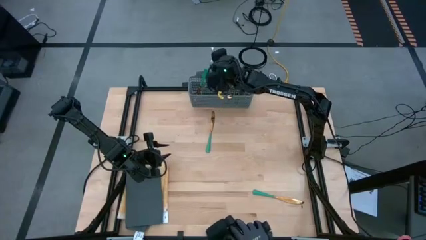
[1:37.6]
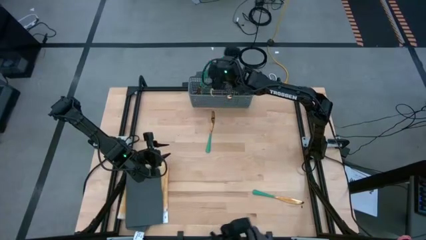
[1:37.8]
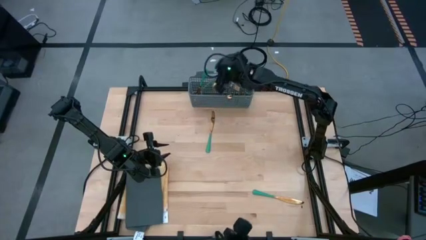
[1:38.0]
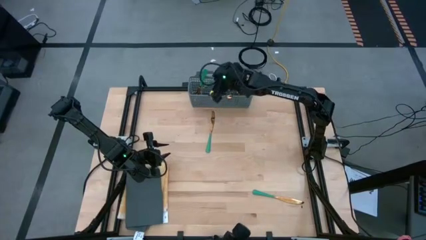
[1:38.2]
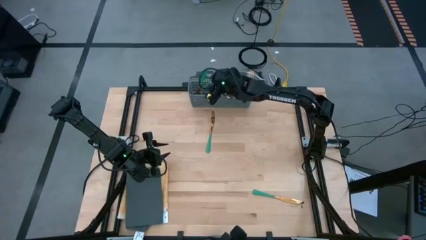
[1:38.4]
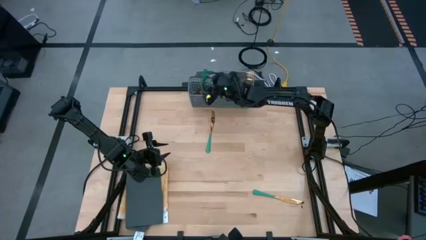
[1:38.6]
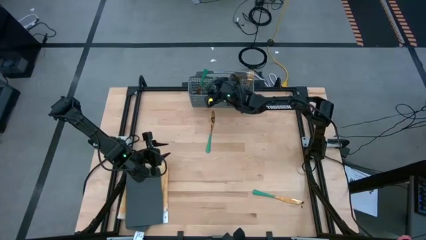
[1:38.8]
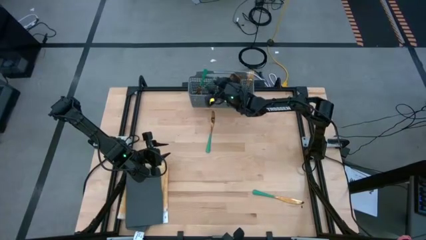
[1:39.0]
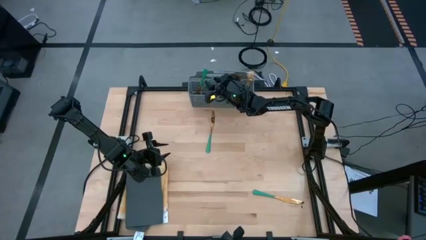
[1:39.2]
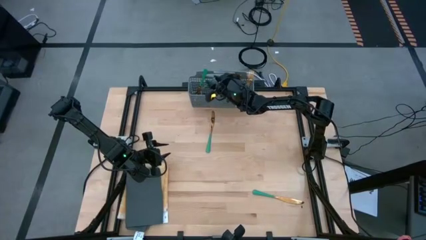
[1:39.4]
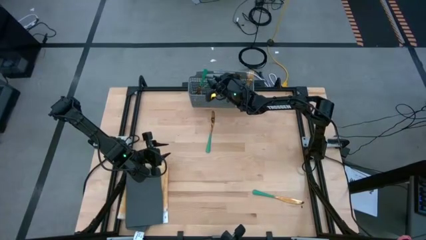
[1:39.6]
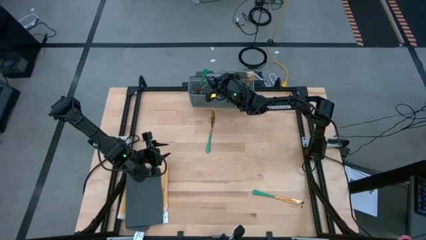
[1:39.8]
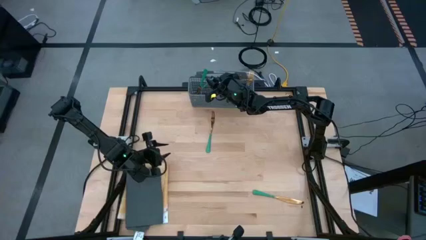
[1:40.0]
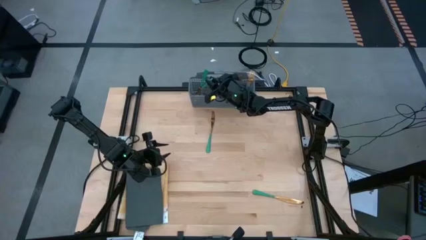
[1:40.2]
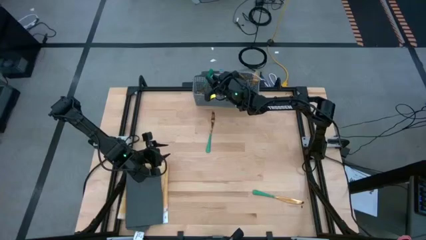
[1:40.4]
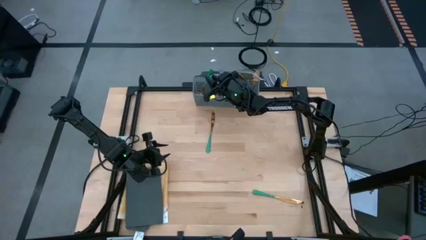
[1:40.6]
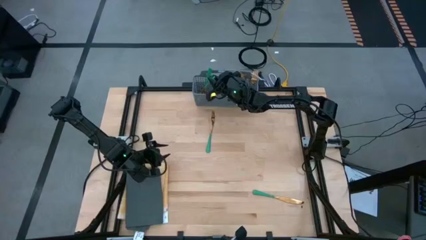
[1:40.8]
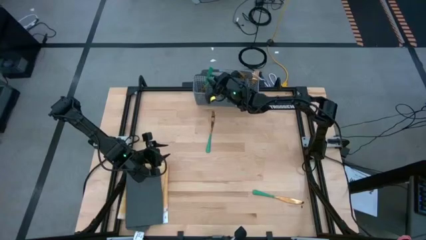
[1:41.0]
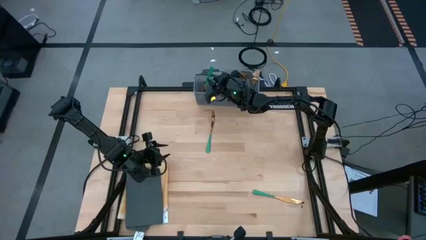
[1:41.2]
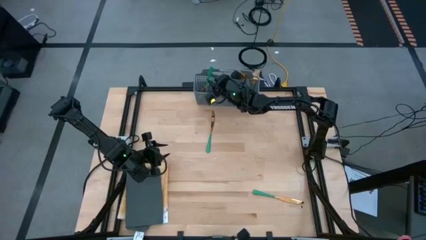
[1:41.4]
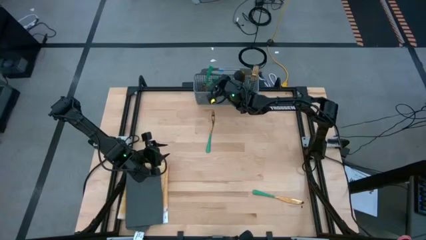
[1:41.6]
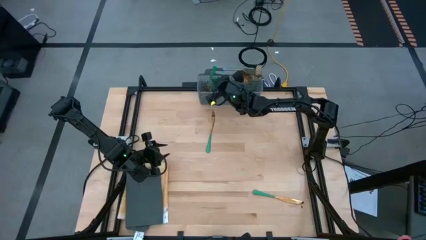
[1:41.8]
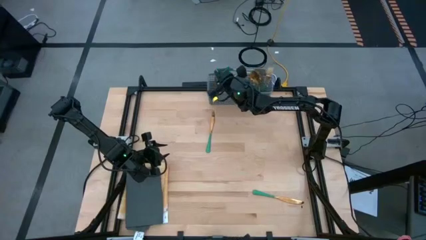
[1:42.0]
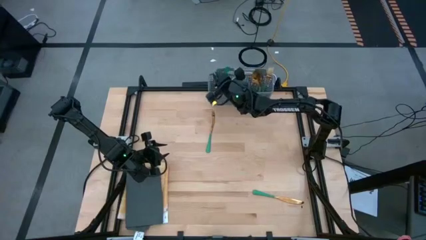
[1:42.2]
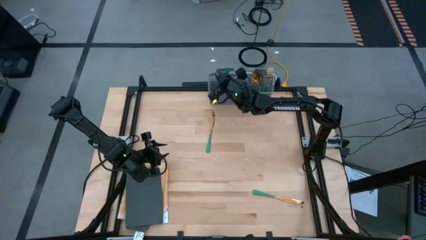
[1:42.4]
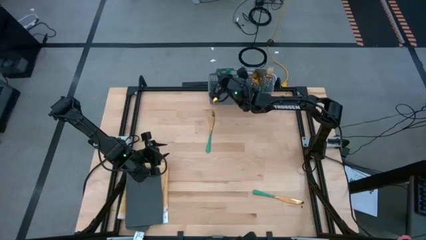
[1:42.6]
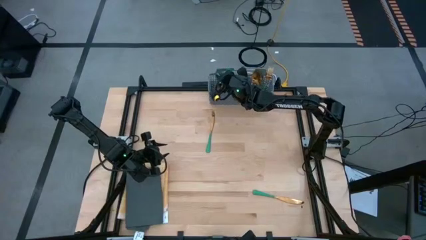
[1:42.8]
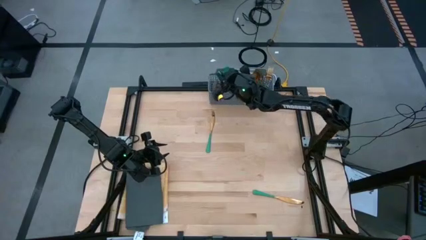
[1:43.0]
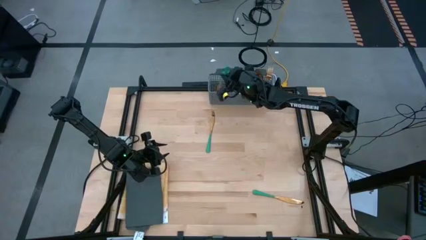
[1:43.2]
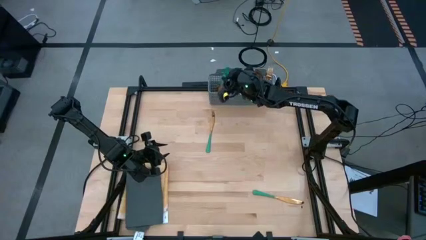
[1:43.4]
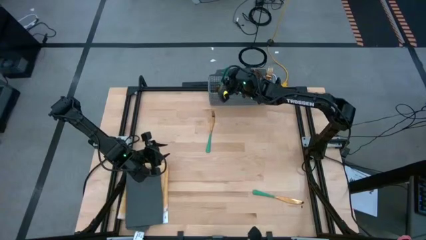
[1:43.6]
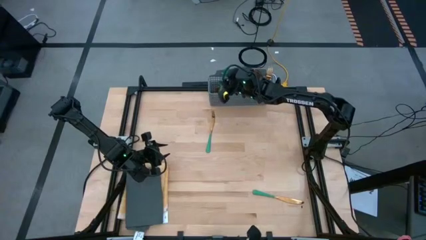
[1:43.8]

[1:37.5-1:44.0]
Task: Sort silverware
Put the green knife into the gray silverware holder

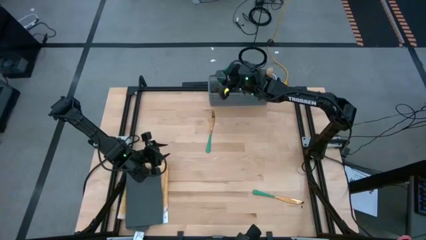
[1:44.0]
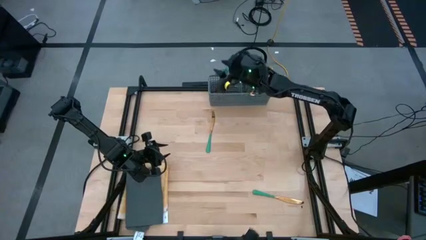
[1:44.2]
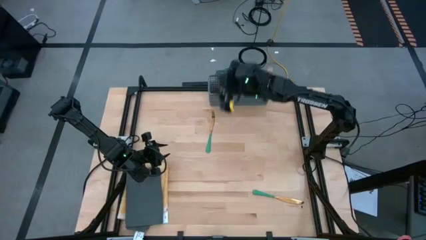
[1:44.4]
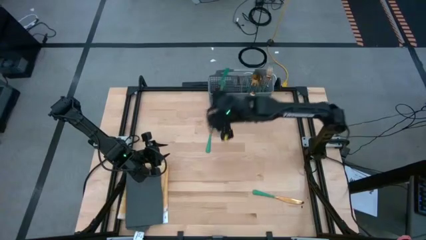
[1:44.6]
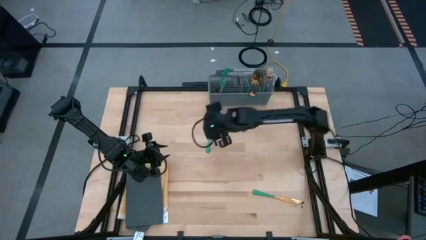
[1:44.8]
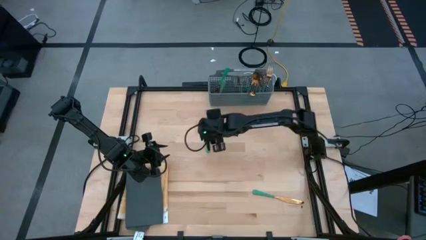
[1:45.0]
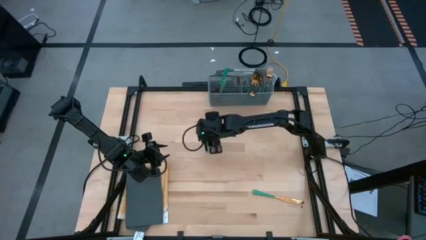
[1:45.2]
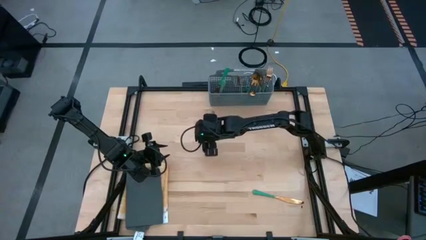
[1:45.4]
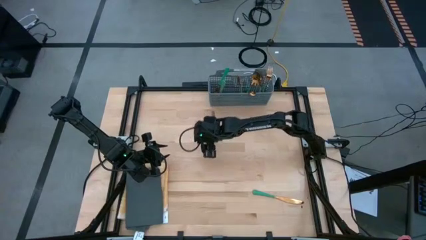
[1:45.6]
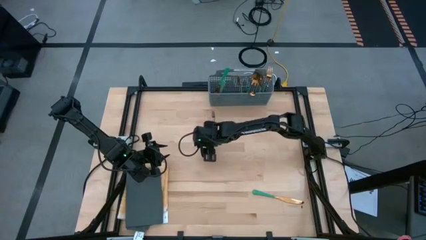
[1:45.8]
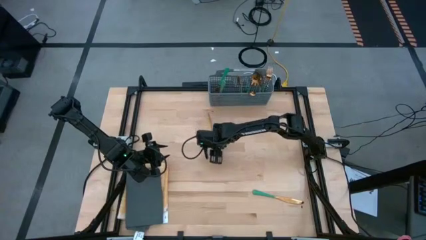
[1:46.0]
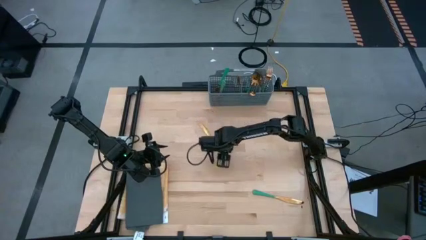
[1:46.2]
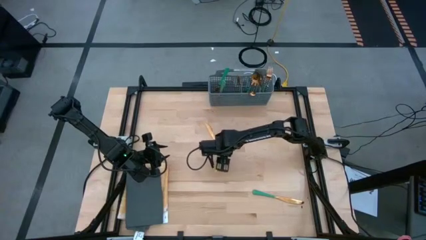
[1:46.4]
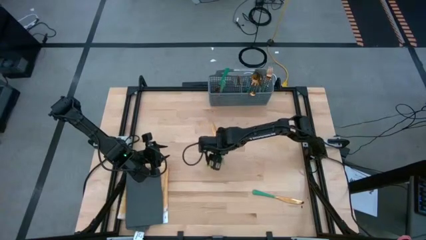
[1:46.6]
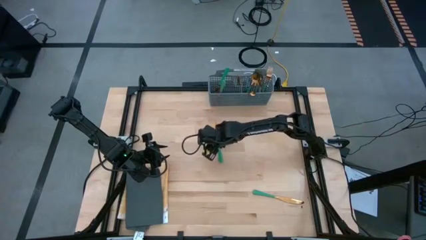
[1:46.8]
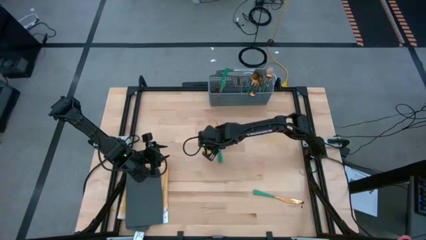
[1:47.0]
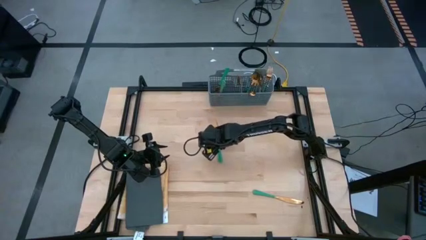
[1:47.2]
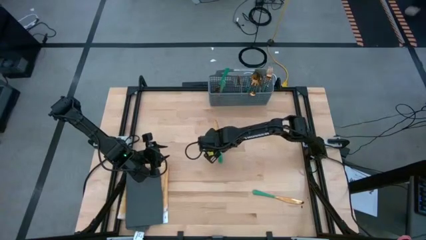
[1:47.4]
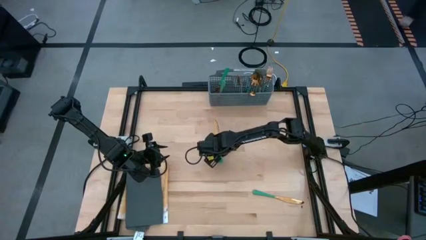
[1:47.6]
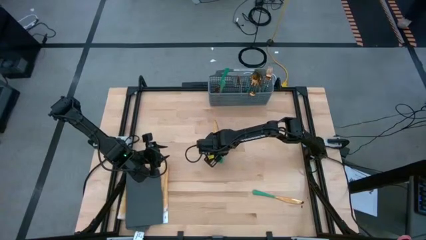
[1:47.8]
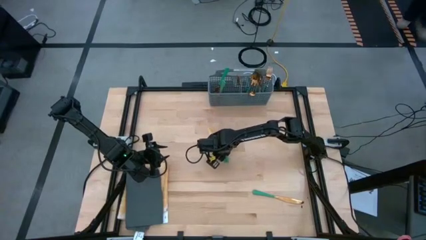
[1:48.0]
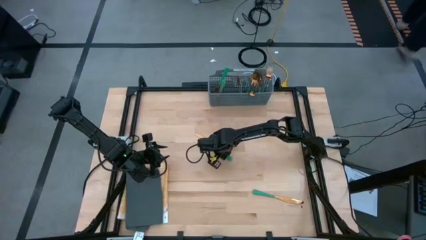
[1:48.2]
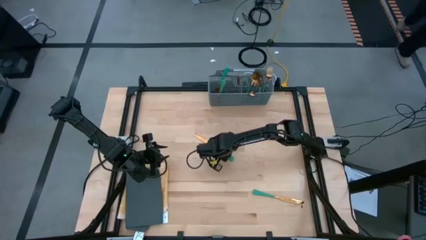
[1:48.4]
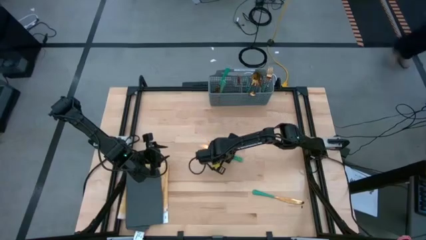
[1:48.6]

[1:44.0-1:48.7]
Put the green knife into the gray silverware holder

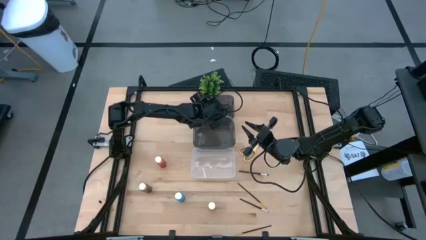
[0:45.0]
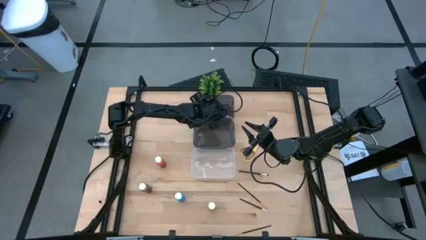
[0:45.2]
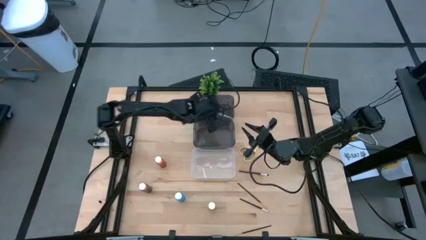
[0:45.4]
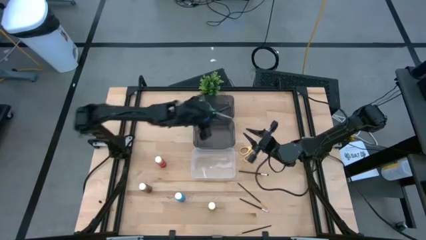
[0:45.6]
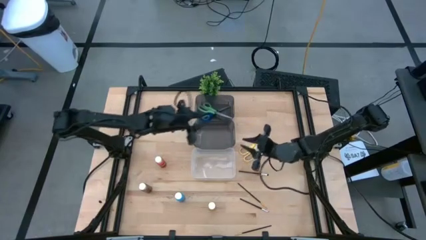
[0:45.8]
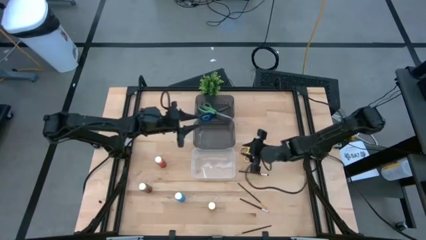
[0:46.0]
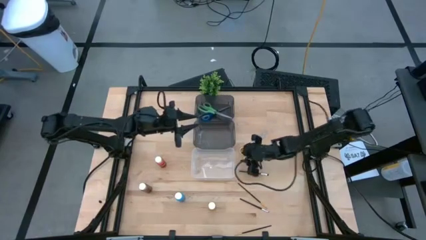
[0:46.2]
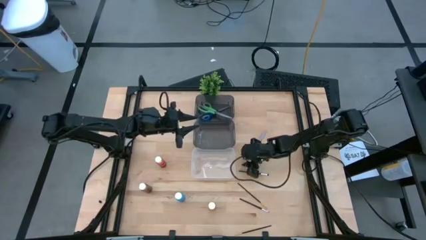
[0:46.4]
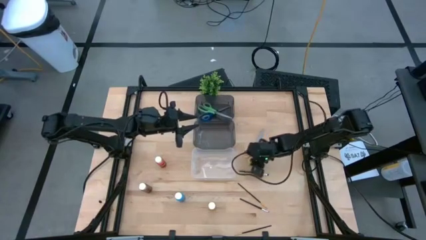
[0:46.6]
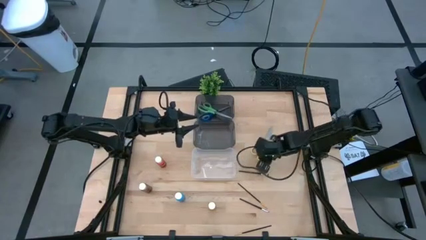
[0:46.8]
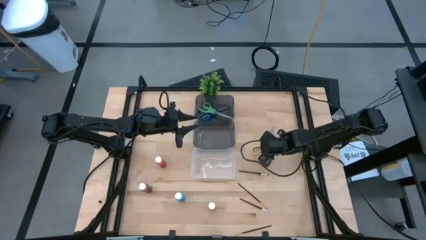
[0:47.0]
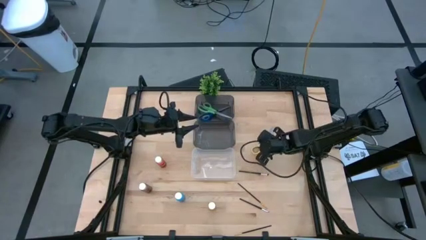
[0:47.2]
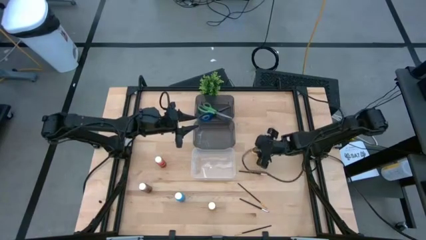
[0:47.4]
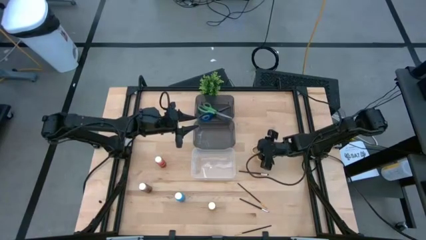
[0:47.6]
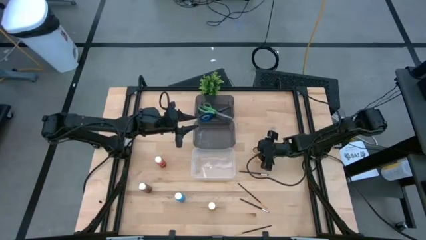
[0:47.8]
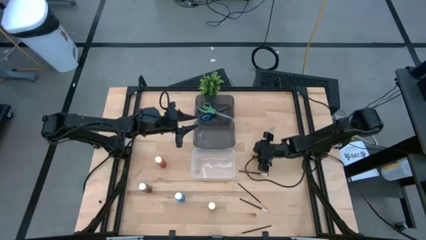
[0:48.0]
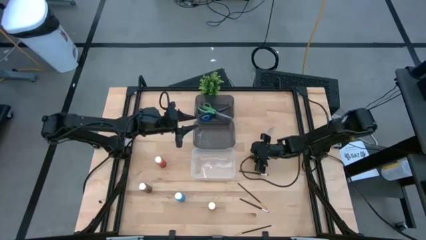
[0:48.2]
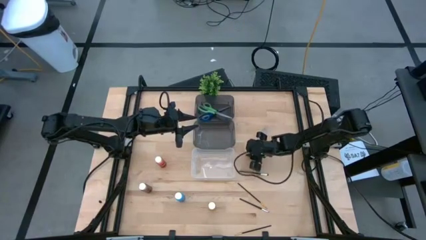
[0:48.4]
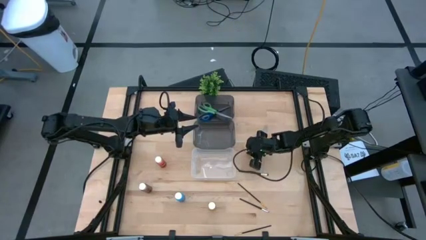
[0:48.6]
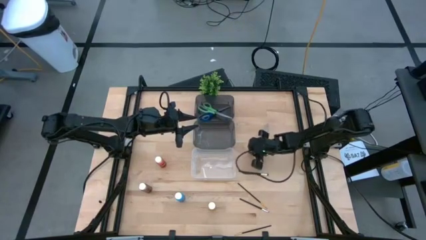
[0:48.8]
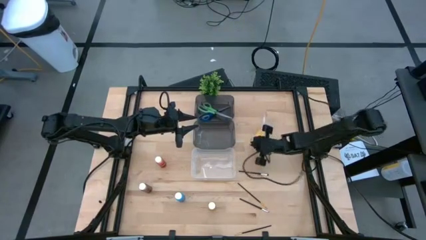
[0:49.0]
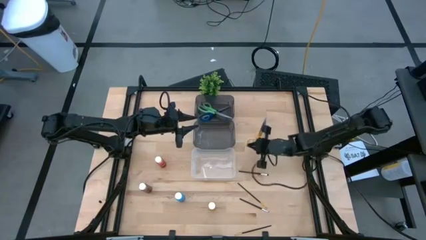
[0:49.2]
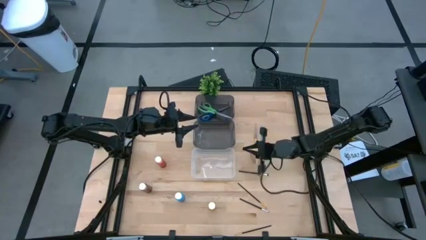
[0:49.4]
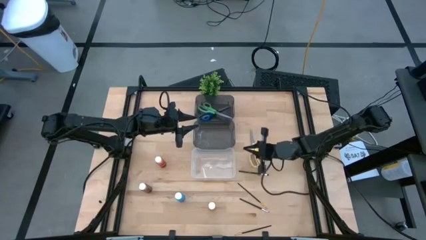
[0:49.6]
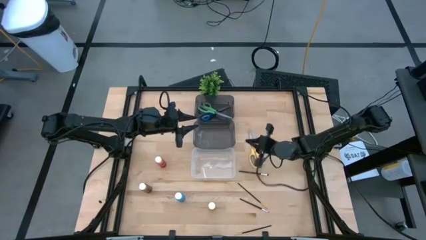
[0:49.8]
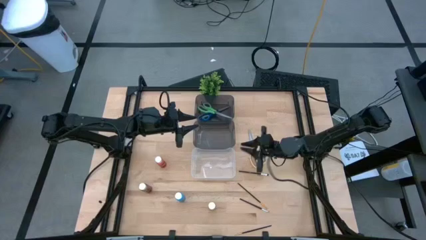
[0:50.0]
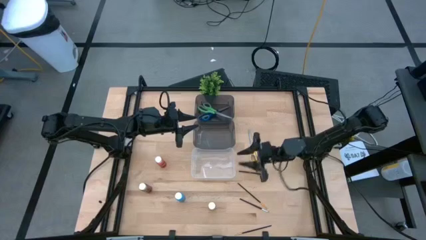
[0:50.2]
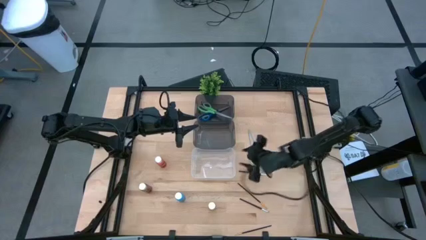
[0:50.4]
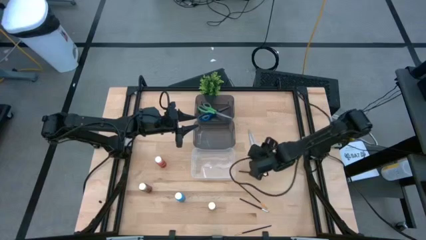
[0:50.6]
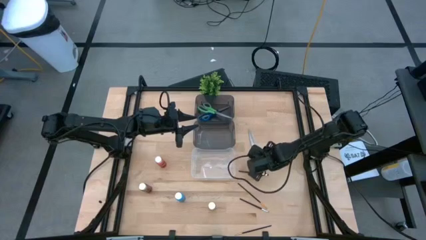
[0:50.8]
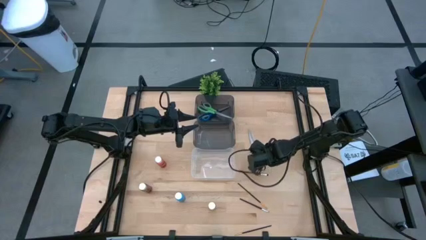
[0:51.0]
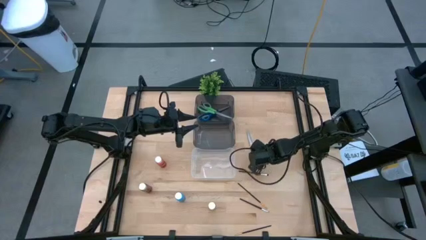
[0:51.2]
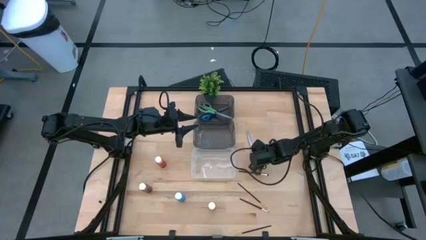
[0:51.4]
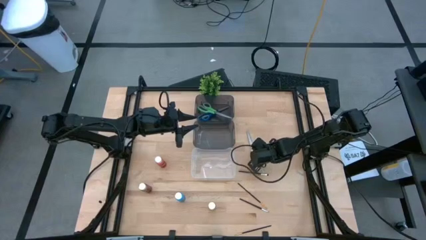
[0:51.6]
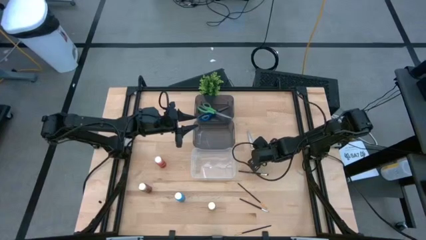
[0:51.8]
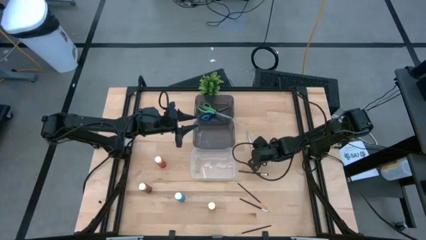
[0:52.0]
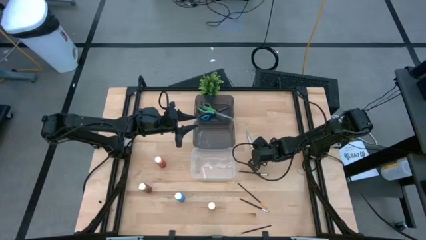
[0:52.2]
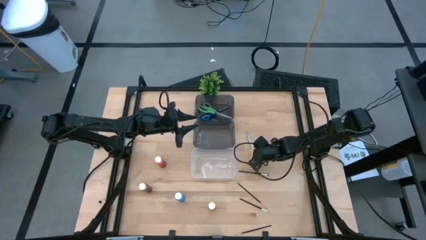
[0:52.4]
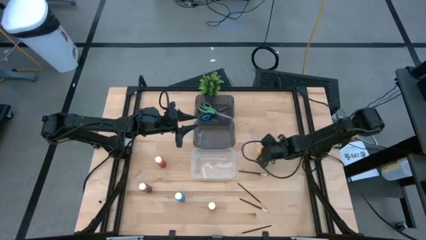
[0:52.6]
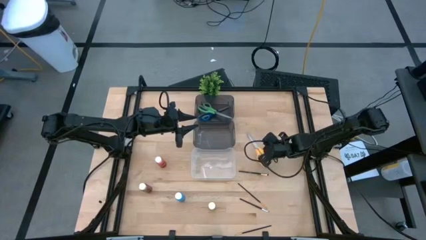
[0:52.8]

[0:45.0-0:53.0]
Task: Pick & Place Paint Supplies
Put the yellow scissors into the top black bin
